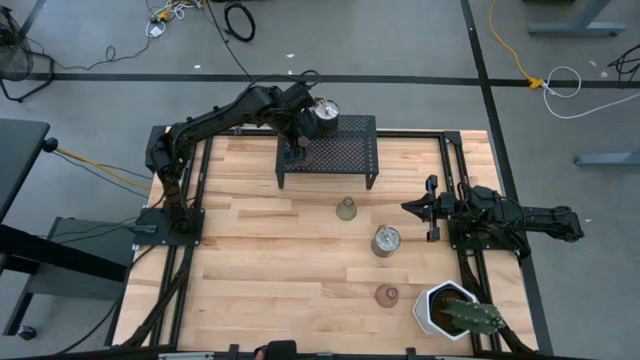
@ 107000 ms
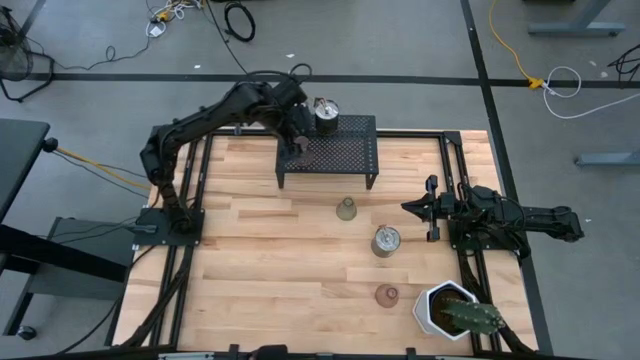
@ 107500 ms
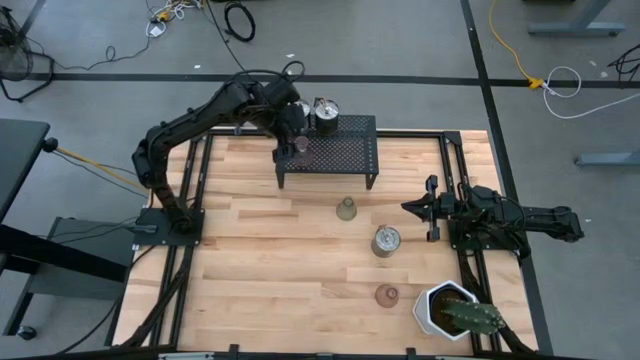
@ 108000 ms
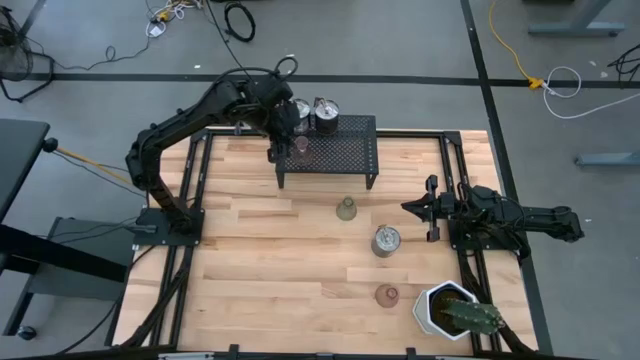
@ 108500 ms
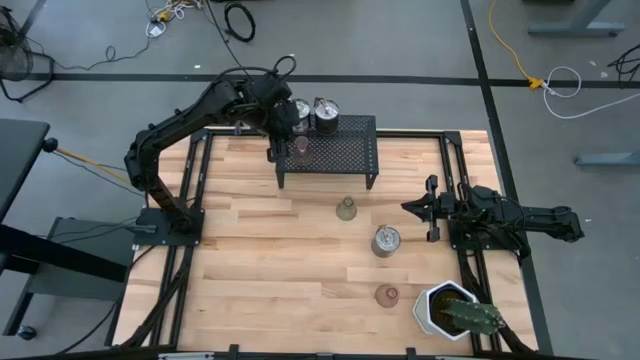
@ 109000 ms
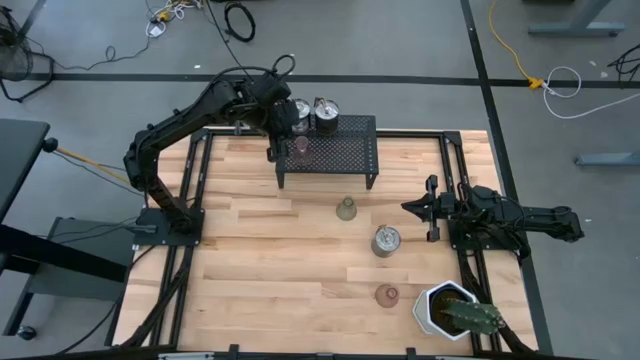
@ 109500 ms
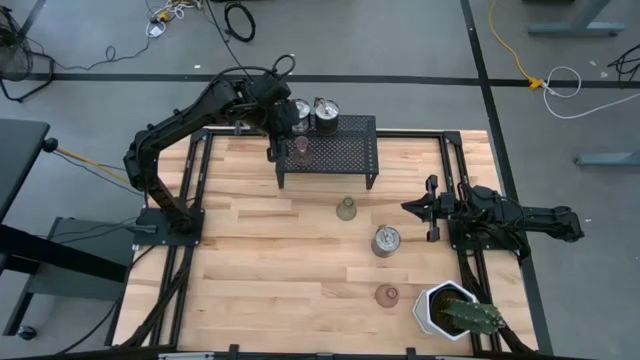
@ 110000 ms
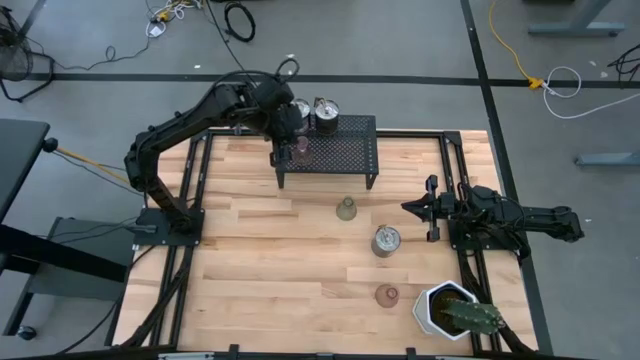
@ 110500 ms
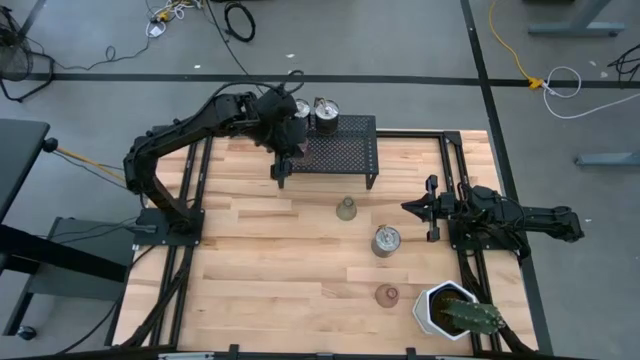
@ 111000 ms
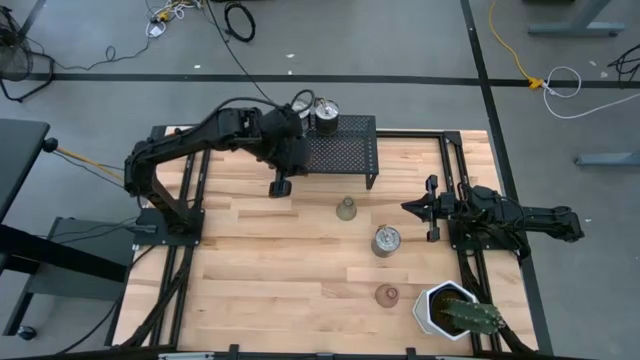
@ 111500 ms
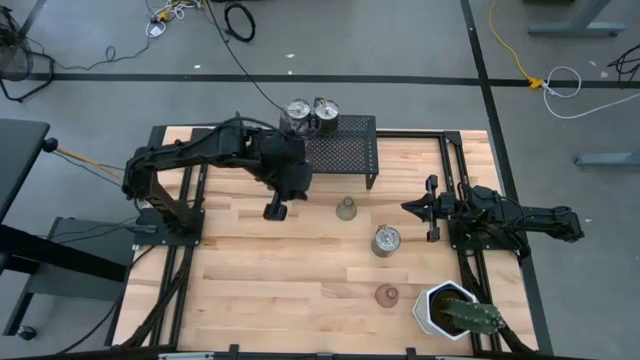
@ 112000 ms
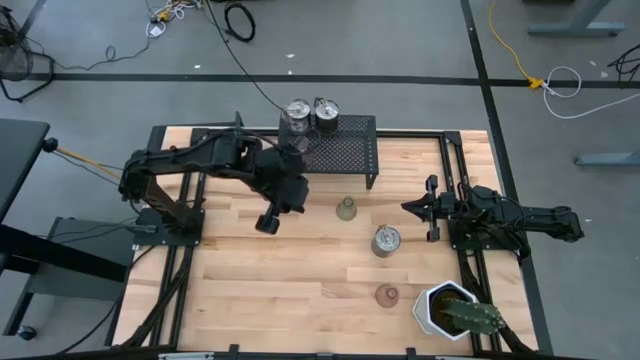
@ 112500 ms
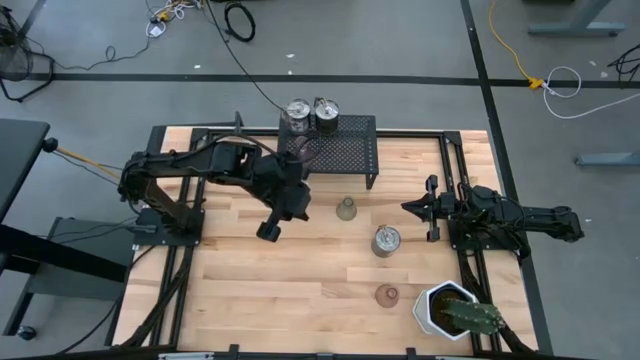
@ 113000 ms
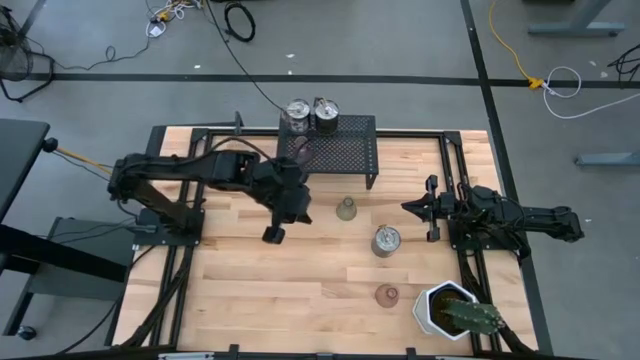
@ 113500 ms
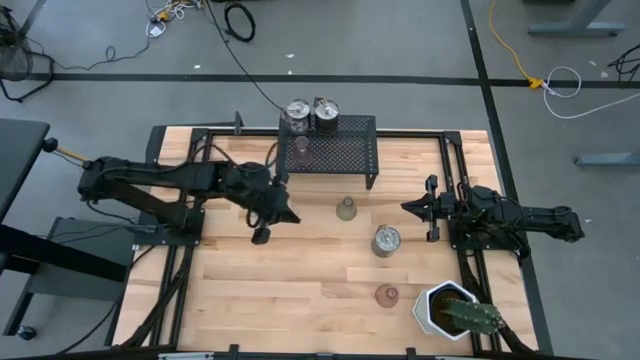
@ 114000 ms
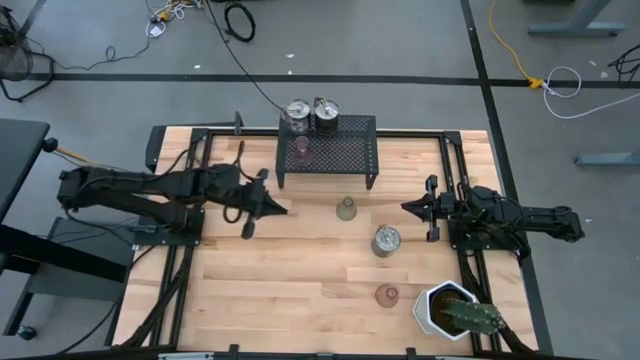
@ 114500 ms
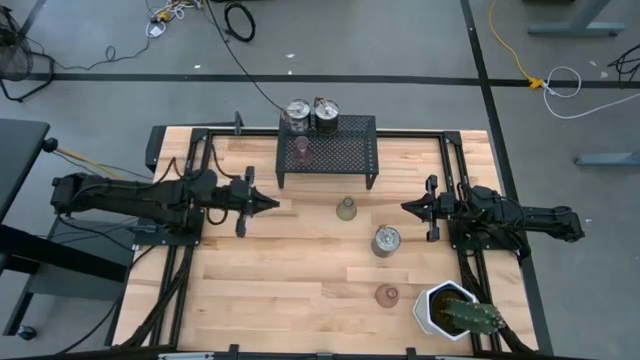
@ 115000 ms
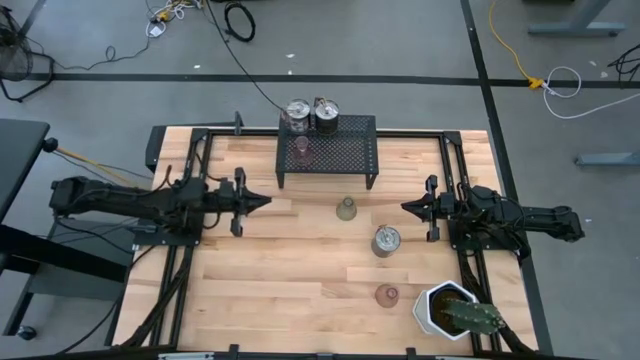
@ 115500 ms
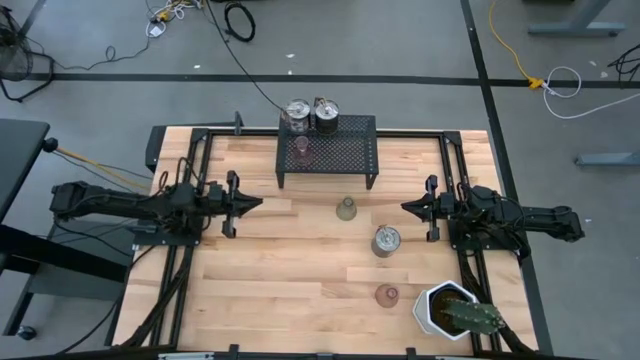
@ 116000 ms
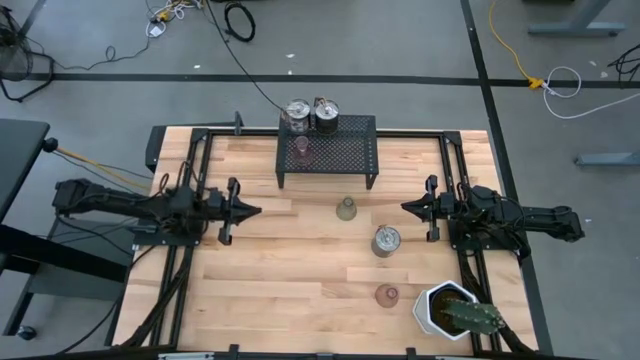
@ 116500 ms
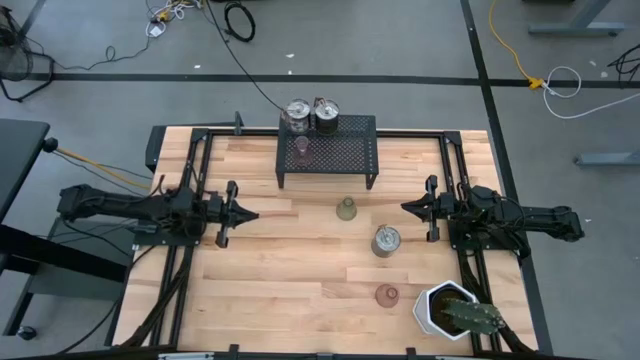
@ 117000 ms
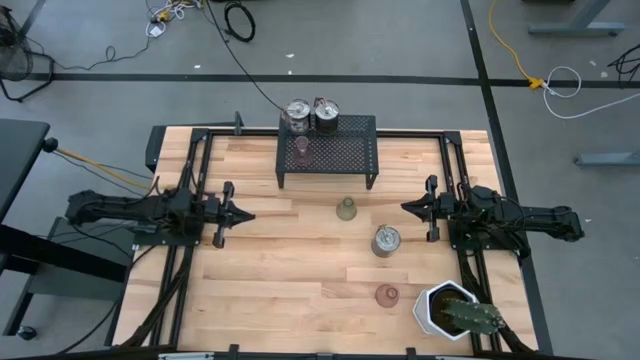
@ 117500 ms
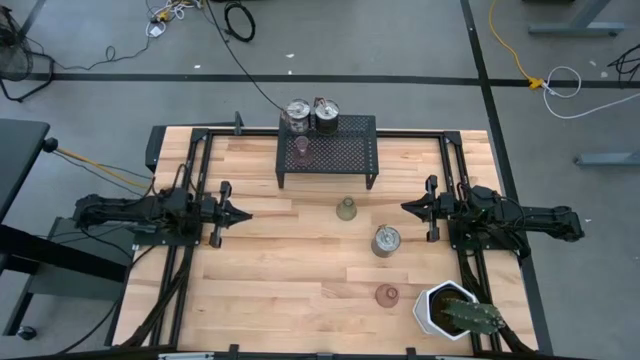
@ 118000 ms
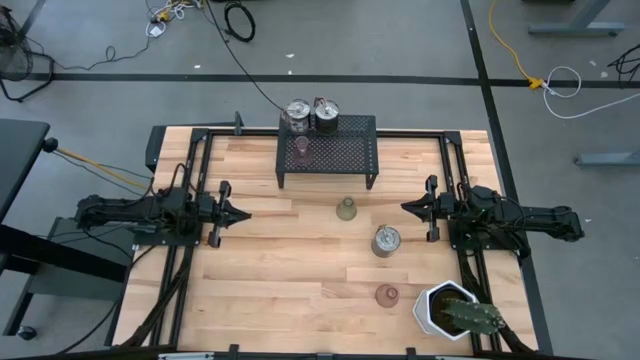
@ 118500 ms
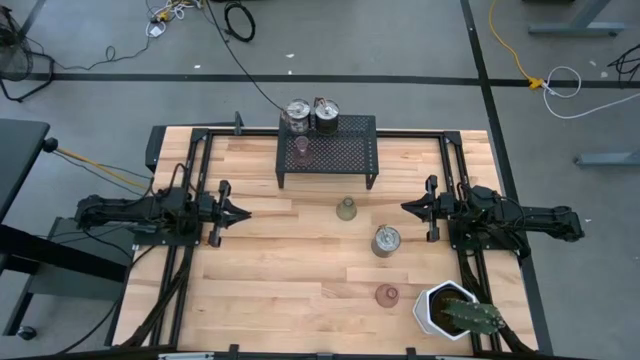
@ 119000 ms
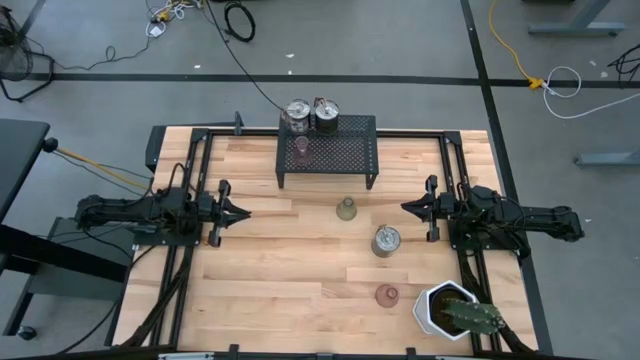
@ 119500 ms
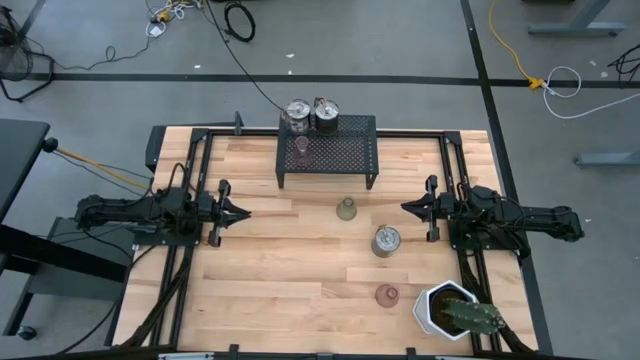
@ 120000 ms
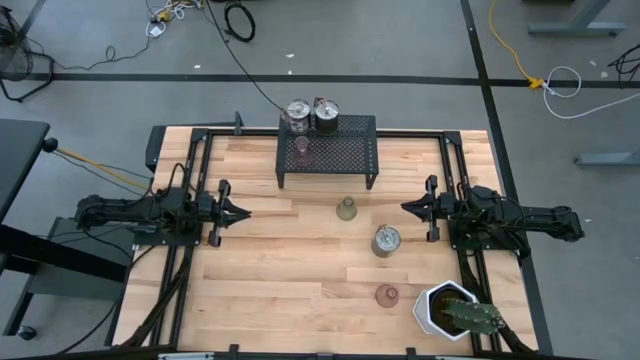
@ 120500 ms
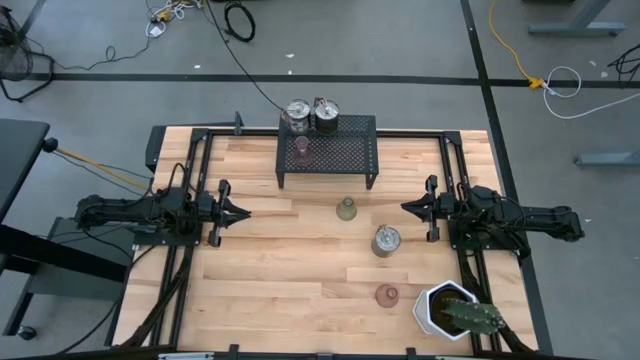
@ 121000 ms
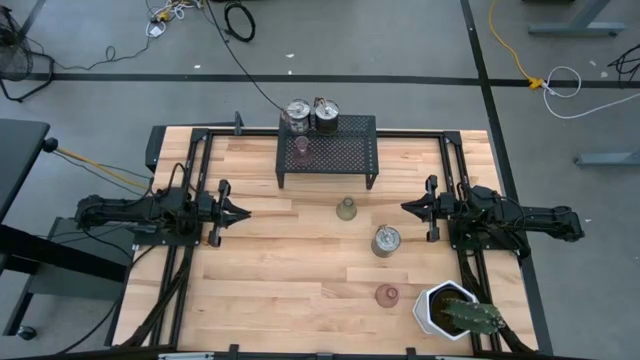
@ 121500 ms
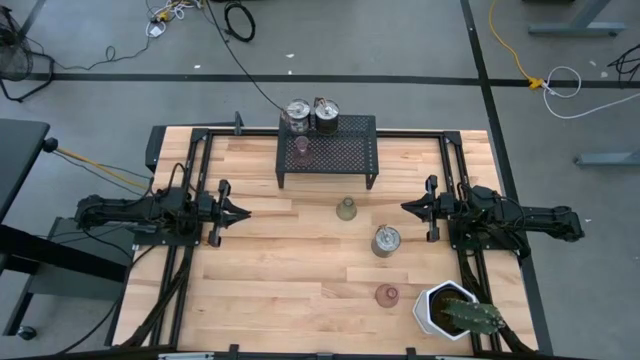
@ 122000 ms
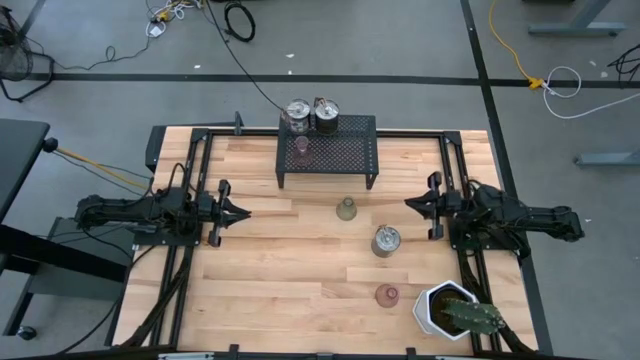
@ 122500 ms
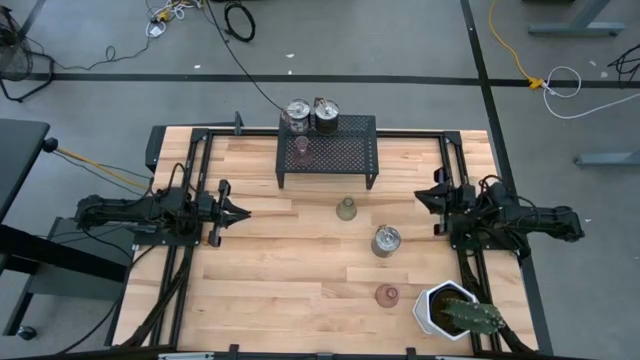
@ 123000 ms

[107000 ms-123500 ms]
Task: Pick & Place candle stick holders
Put the silver scented candle on the shelf

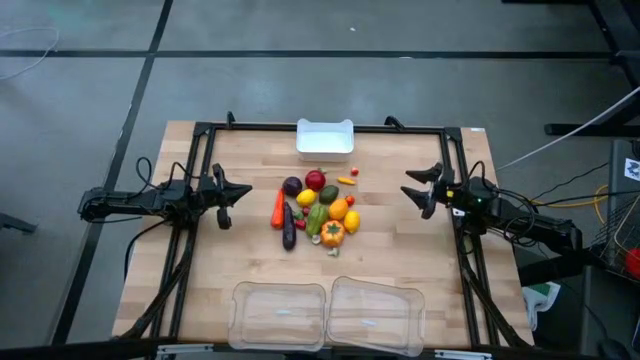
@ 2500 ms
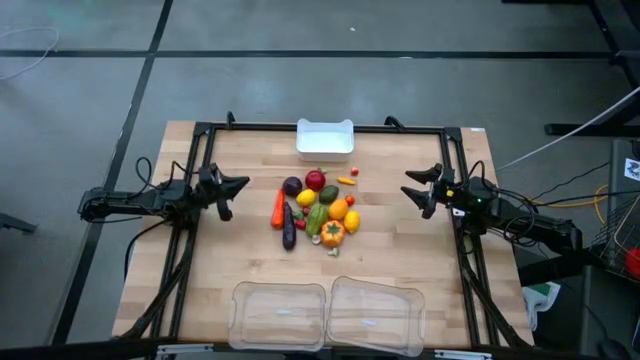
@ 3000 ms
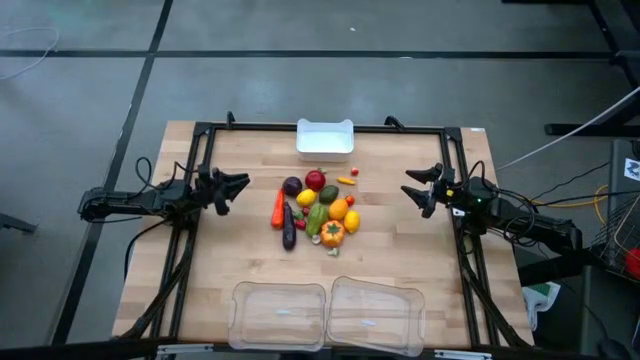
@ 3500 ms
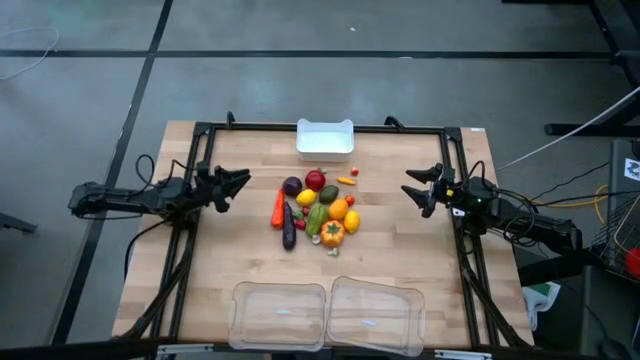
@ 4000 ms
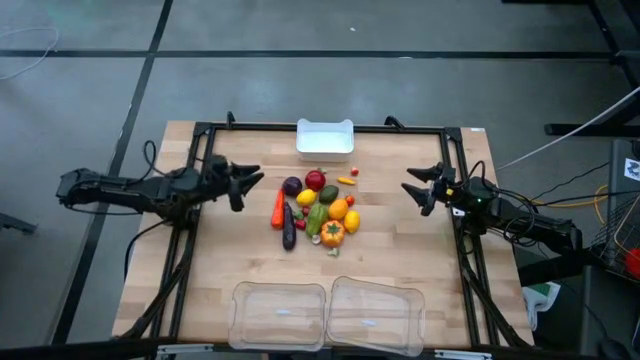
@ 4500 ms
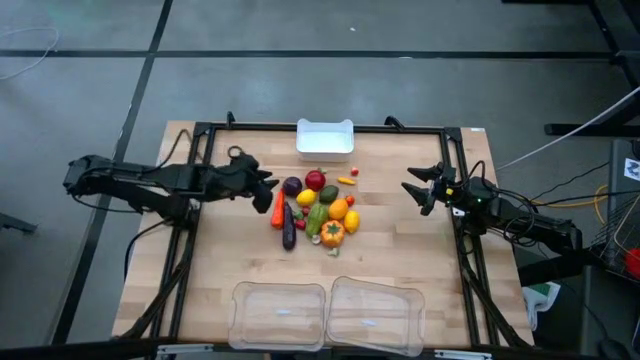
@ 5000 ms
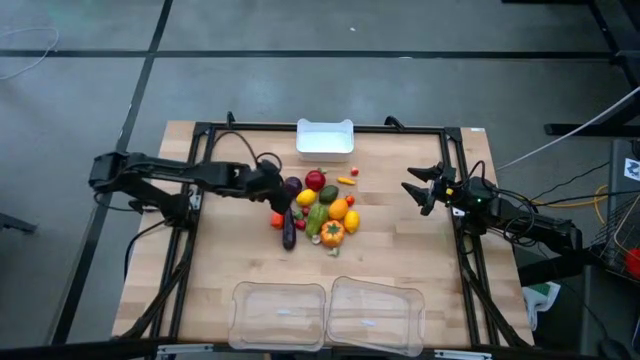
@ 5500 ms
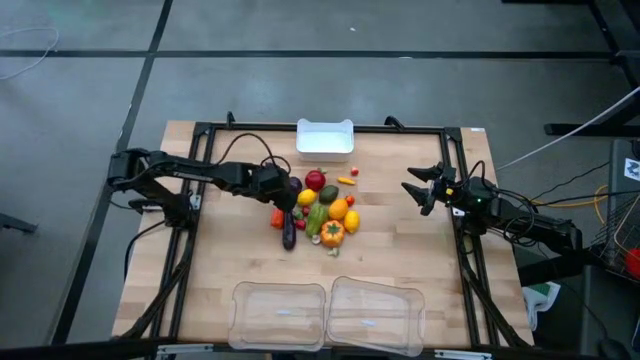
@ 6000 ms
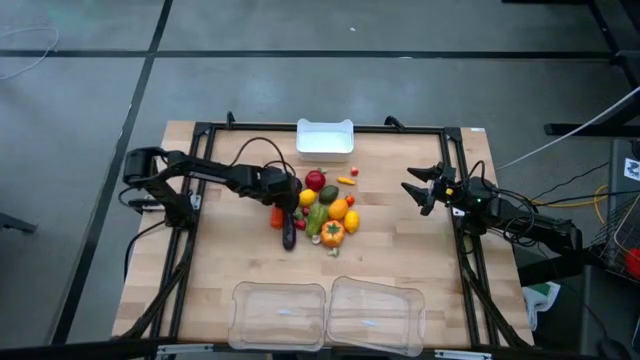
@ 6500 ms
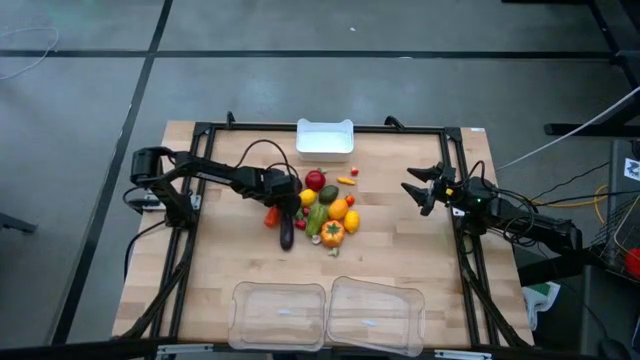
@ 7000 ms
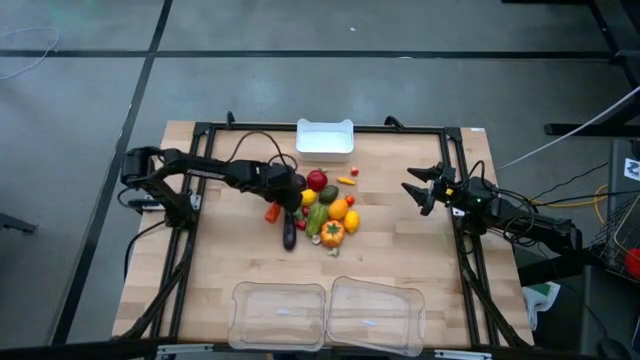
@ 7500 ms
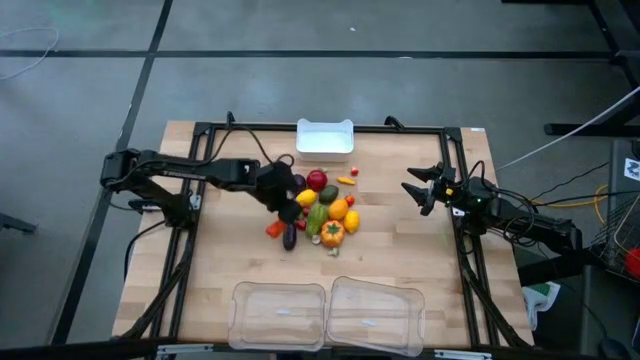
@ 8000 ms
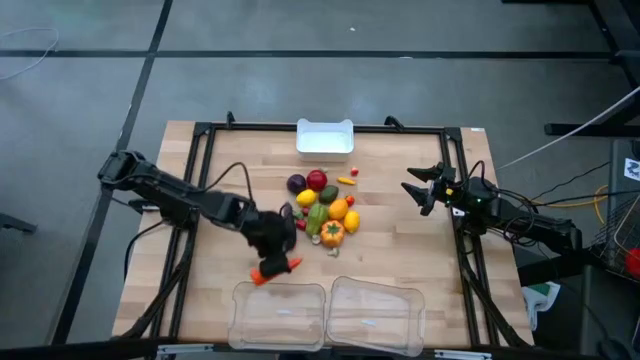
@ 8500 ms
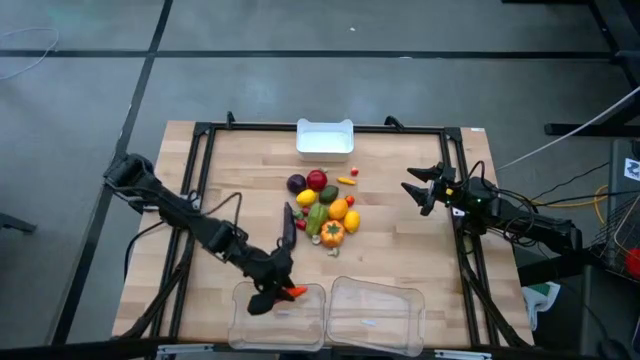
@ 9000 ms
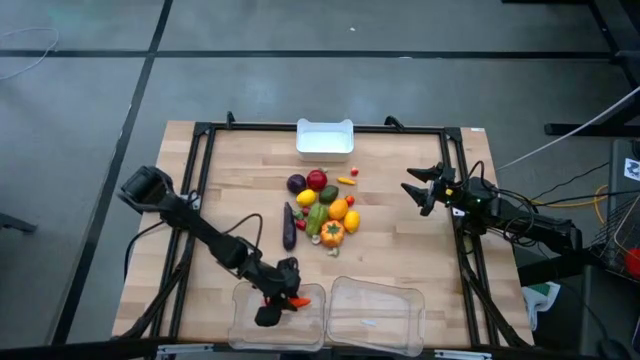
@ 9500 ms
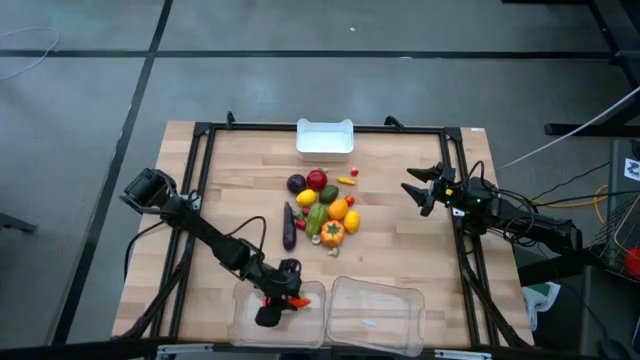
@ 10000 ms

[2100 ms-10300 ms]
Task: Sort produce into baskets
Put the carrot into the left transparent bin
